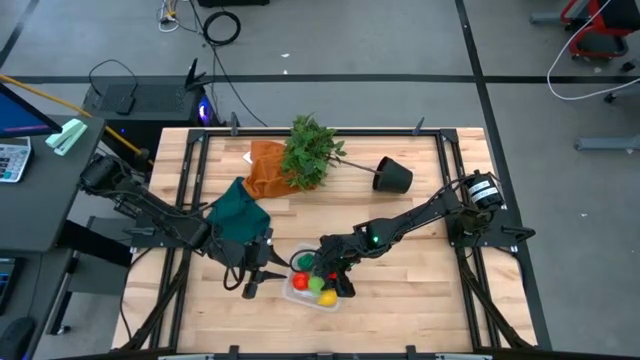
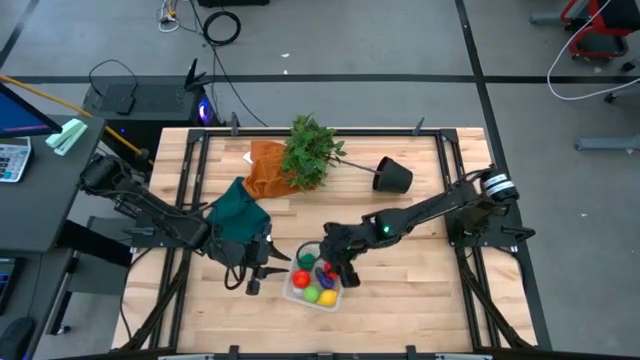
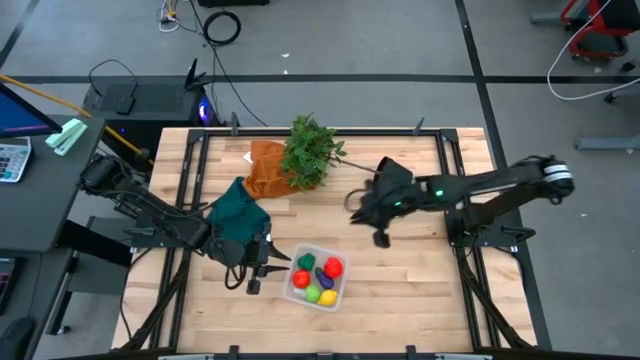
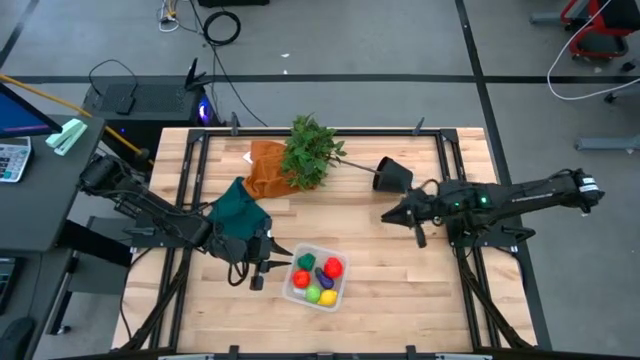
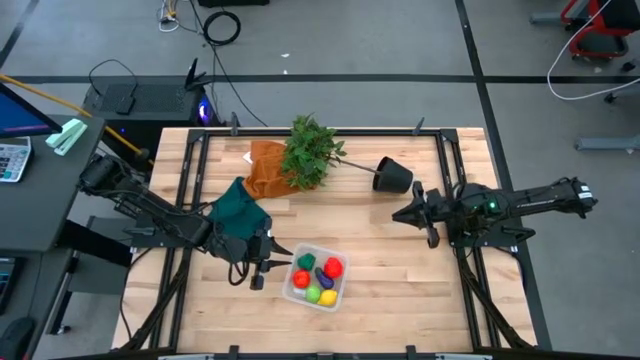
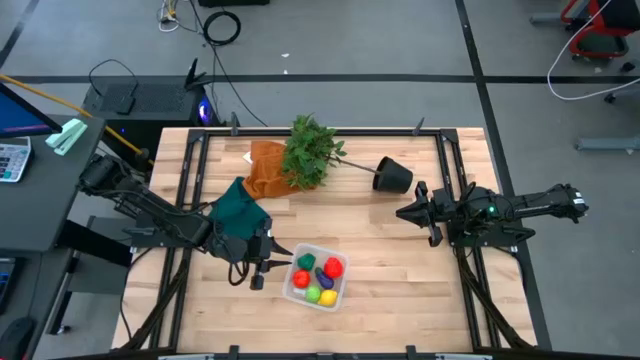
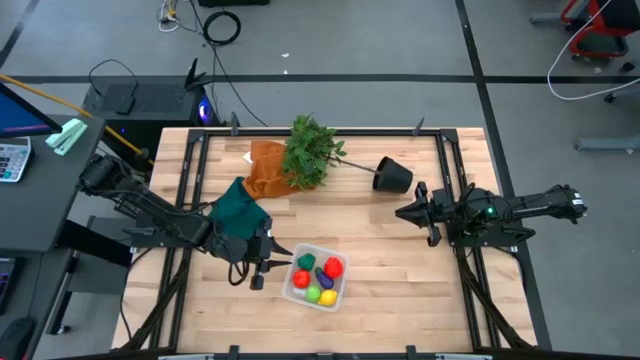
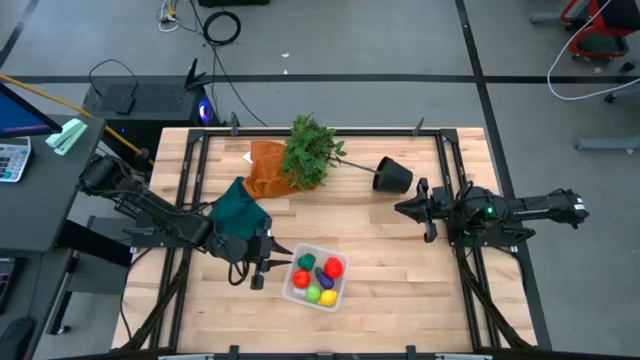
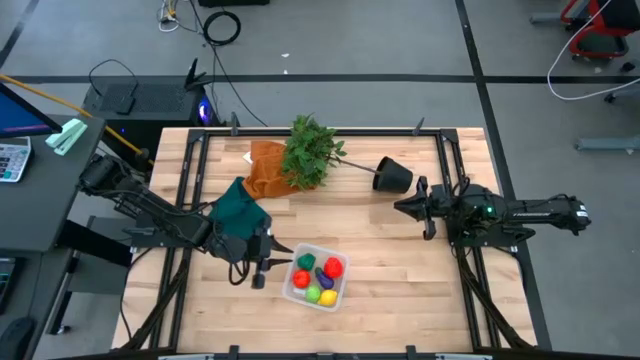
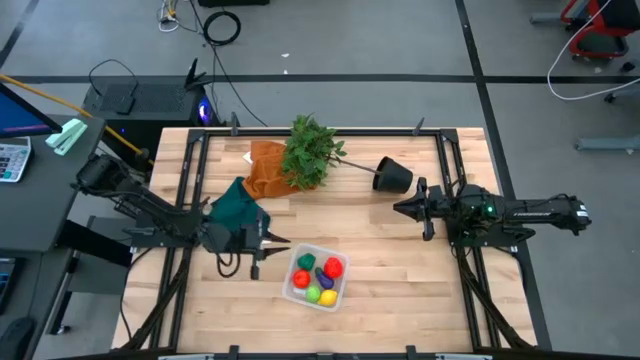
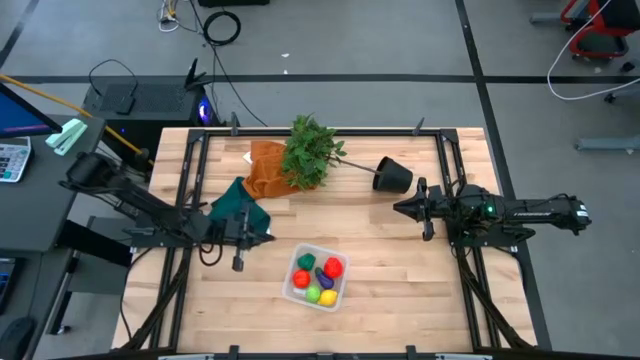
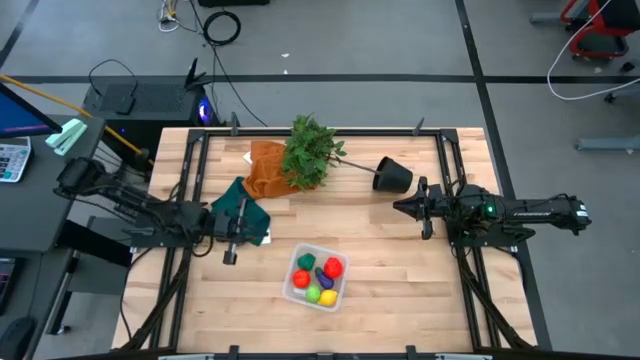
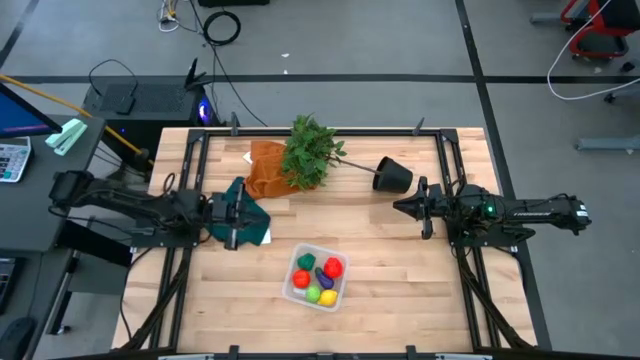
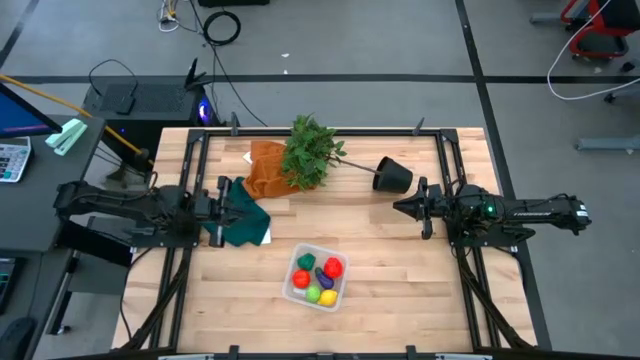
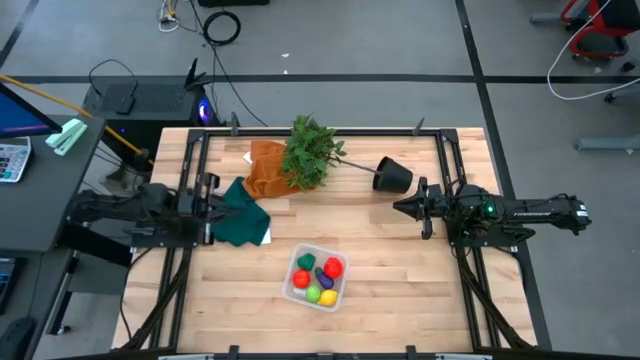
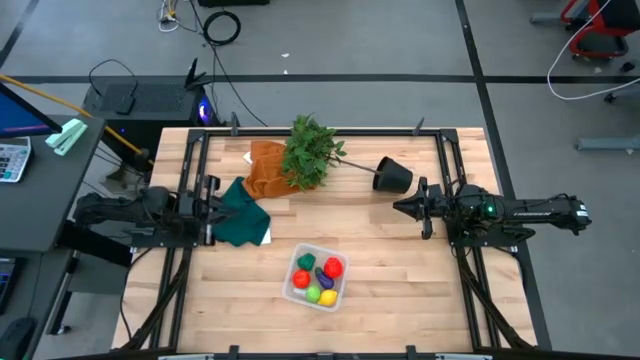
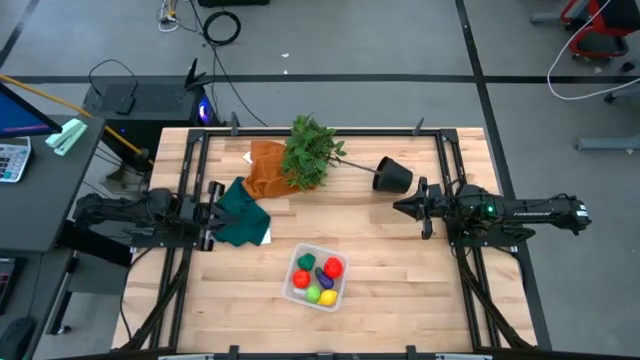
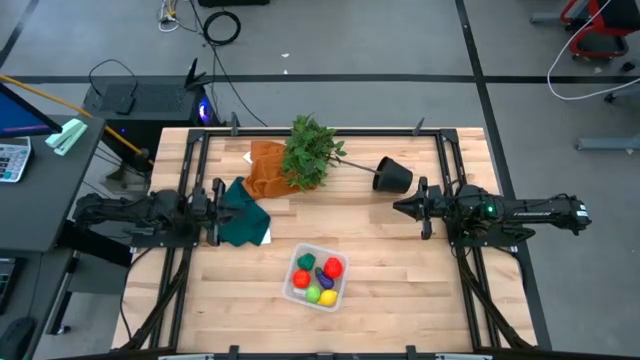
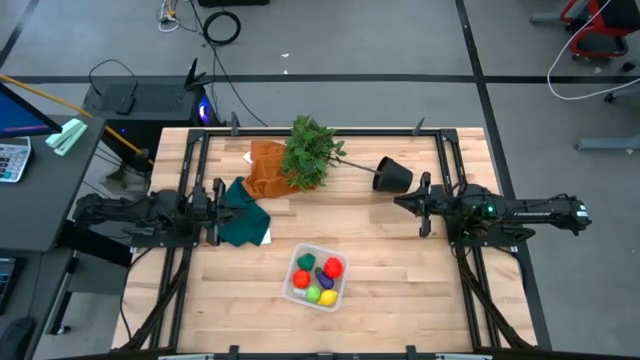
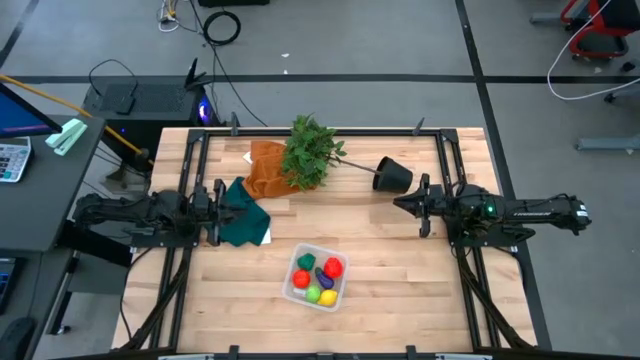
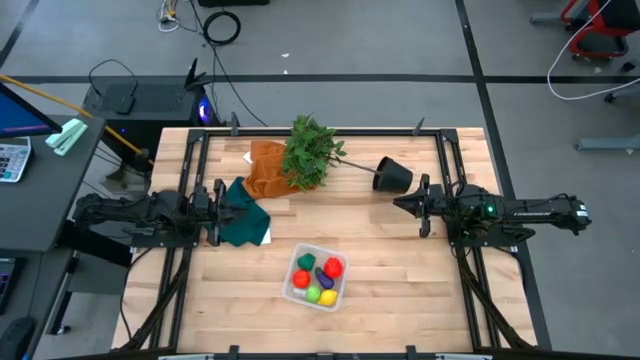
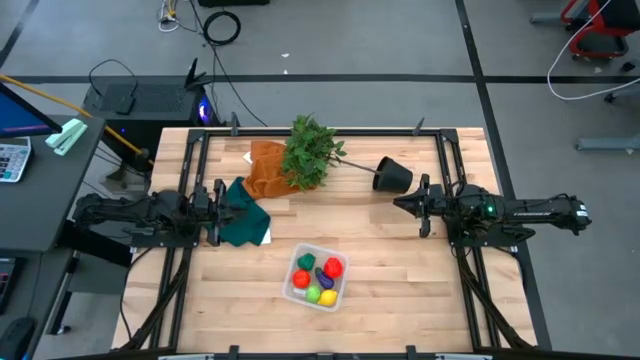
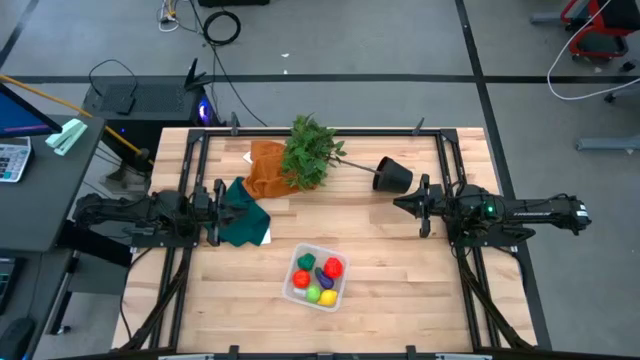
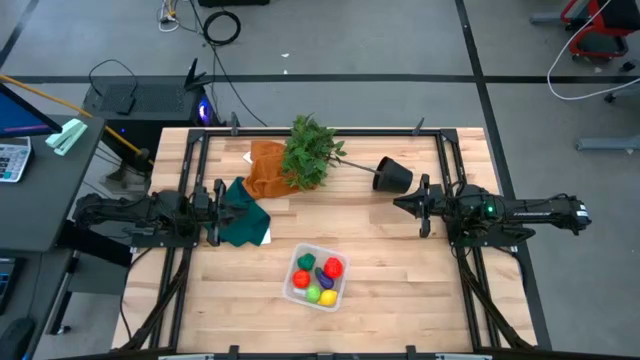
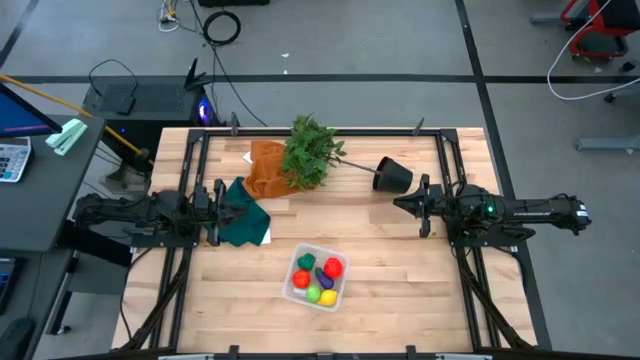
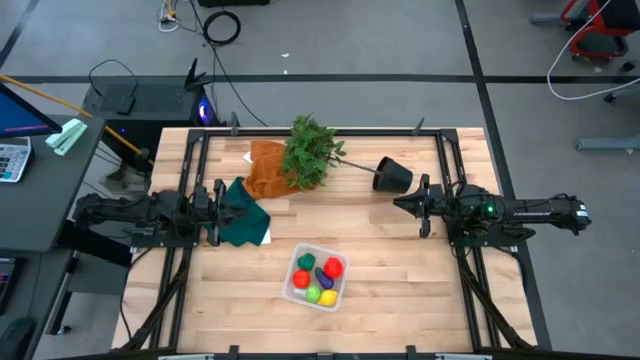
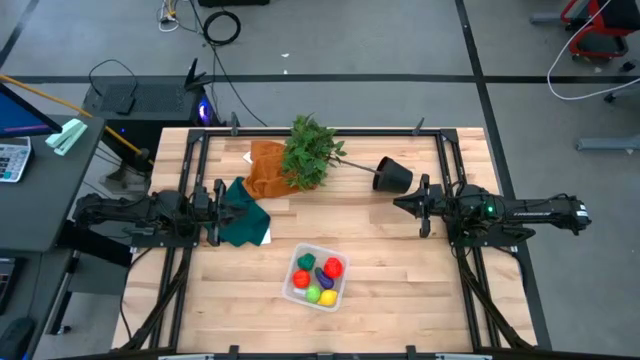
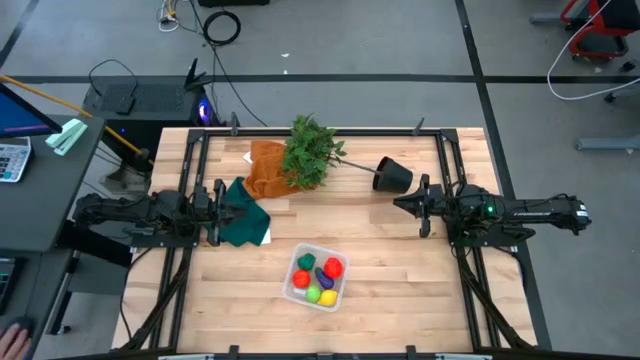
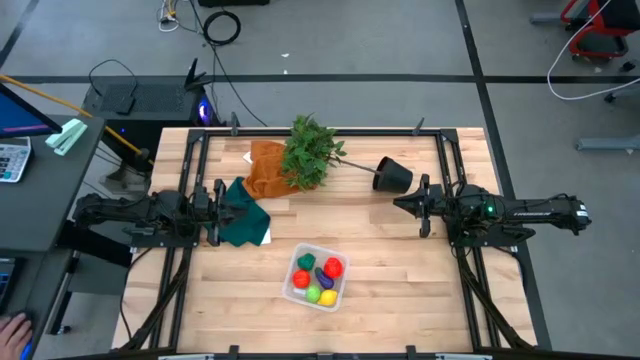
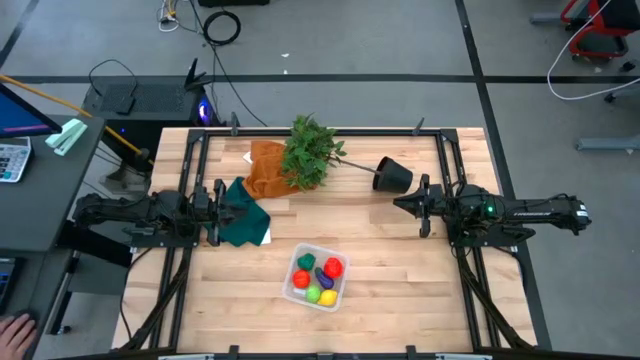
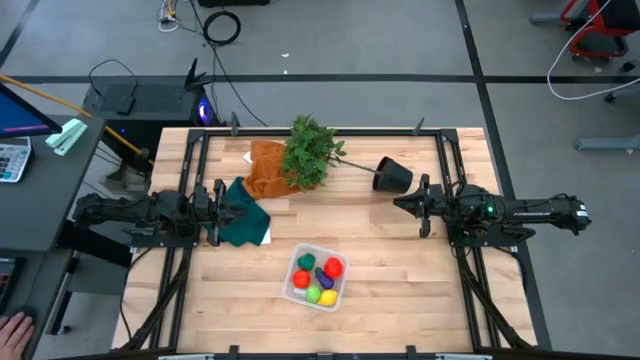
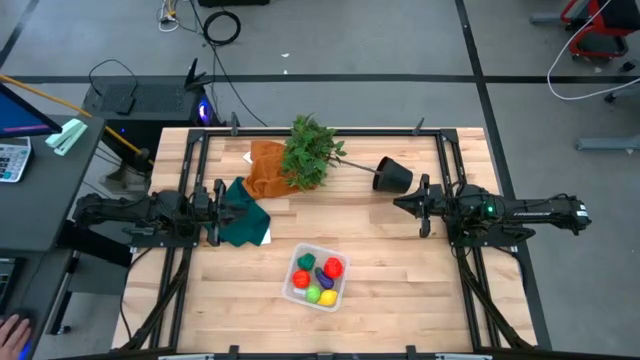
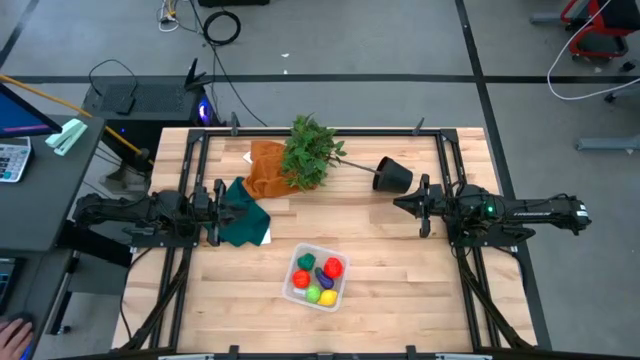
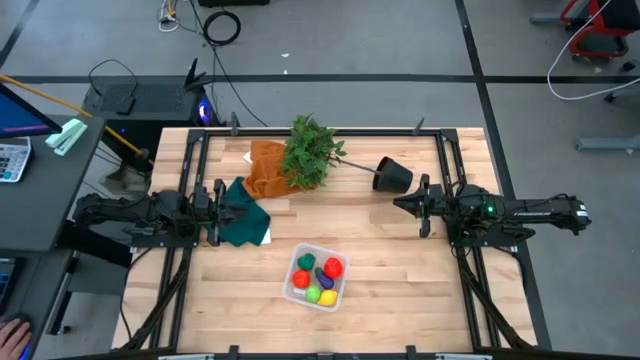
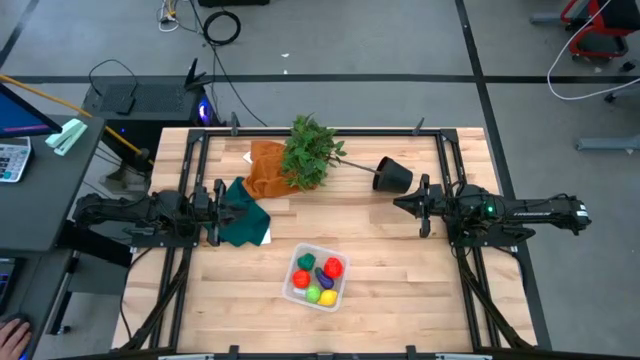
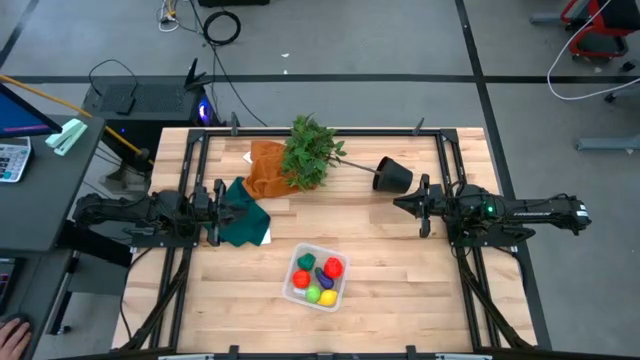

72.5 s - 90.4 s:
Task: Pick and placing Produce into tupperware
Return to Home Position
